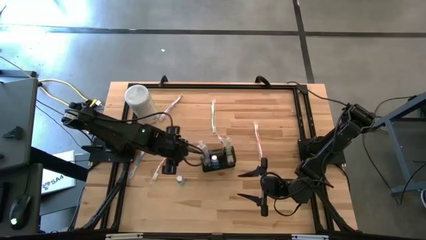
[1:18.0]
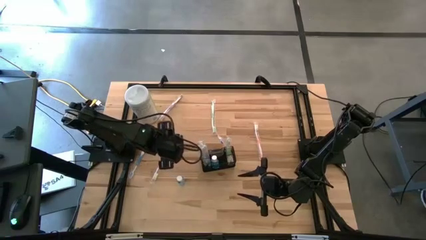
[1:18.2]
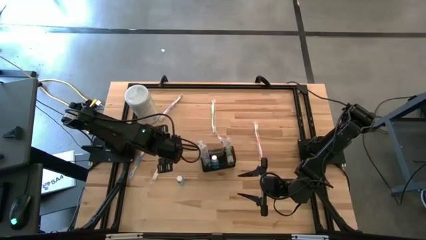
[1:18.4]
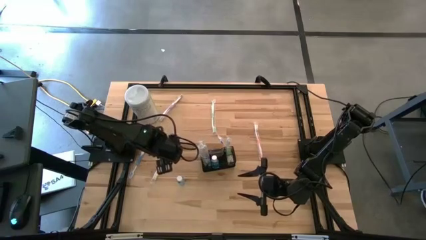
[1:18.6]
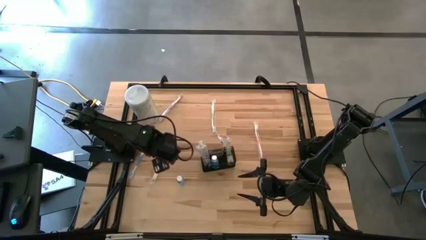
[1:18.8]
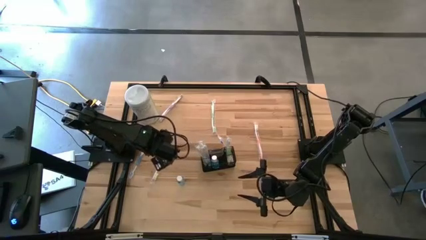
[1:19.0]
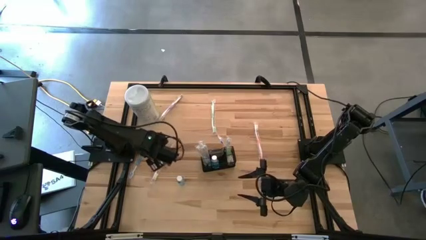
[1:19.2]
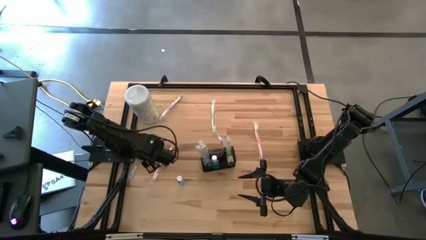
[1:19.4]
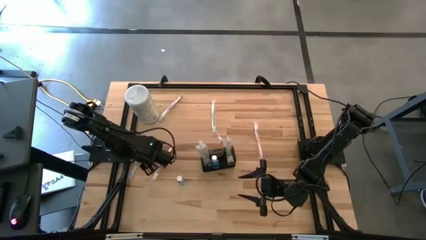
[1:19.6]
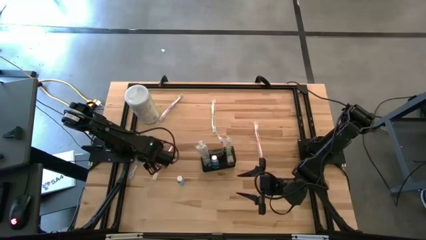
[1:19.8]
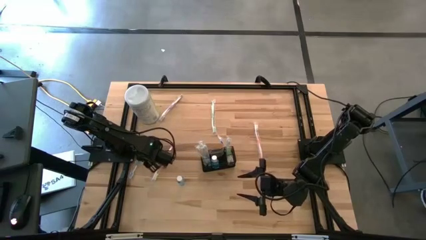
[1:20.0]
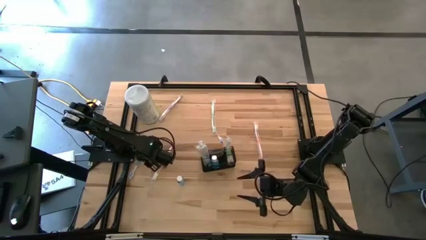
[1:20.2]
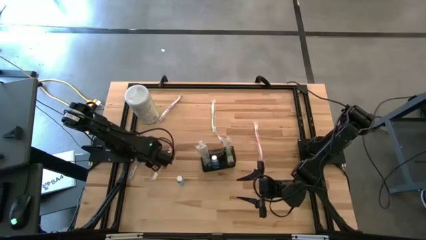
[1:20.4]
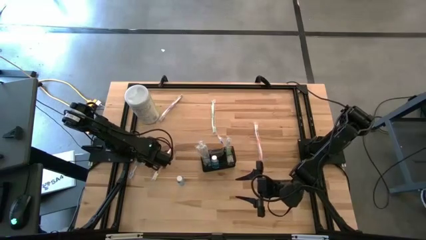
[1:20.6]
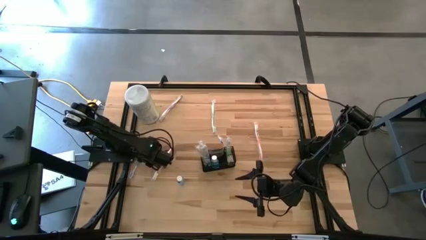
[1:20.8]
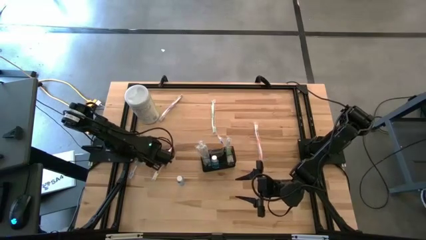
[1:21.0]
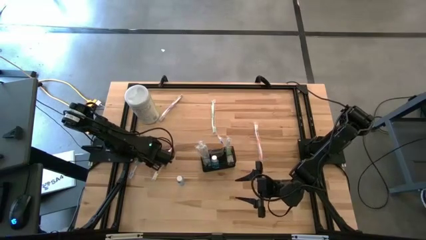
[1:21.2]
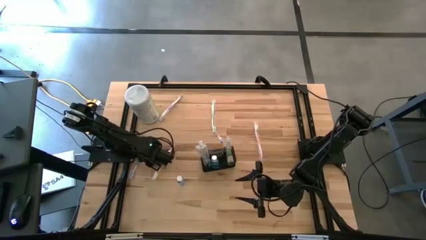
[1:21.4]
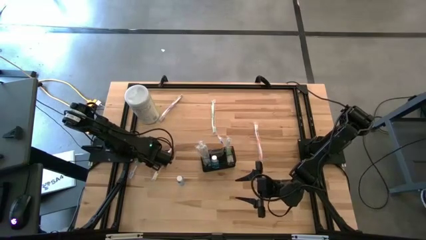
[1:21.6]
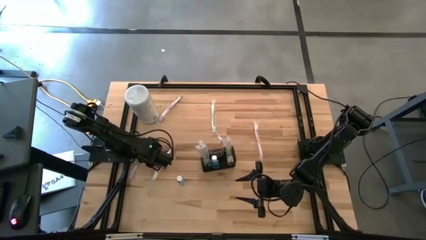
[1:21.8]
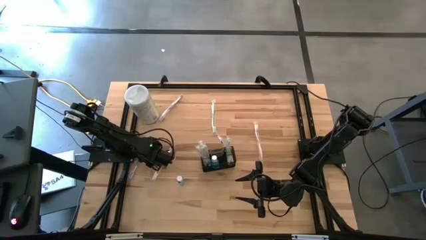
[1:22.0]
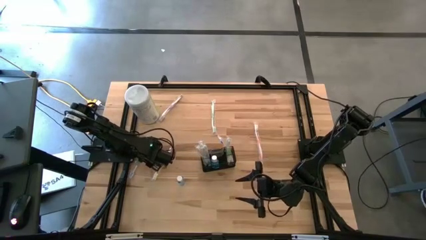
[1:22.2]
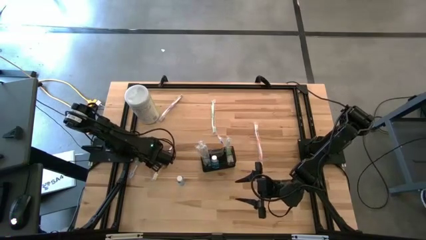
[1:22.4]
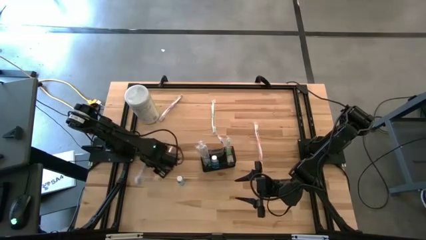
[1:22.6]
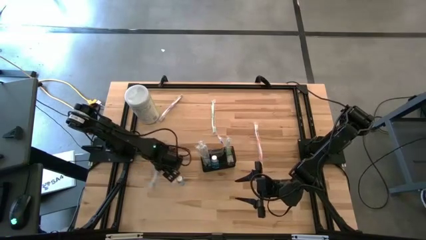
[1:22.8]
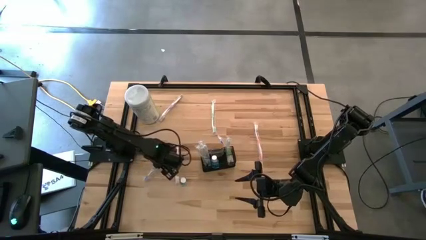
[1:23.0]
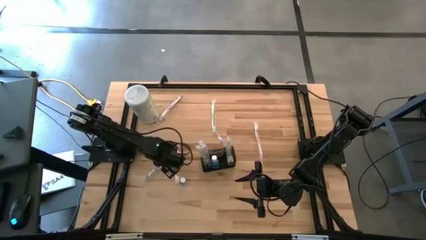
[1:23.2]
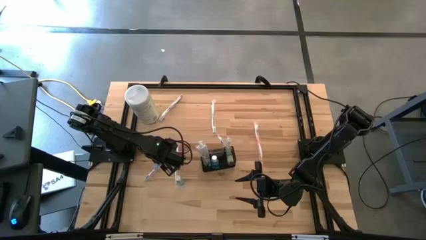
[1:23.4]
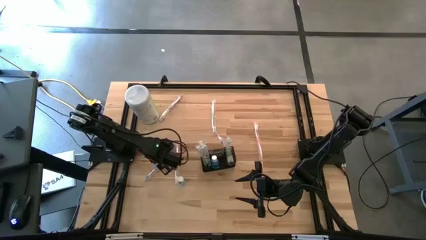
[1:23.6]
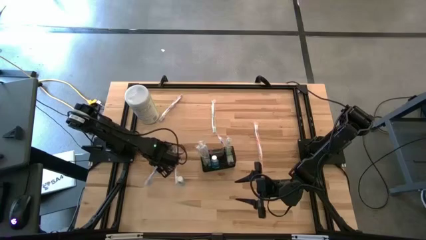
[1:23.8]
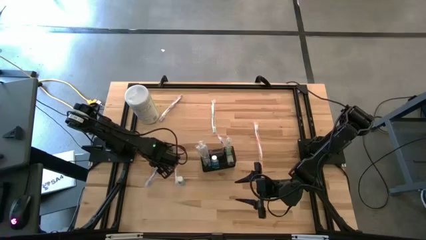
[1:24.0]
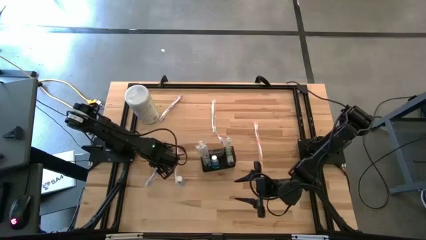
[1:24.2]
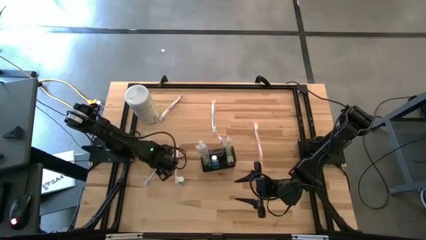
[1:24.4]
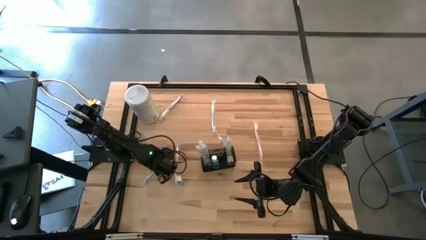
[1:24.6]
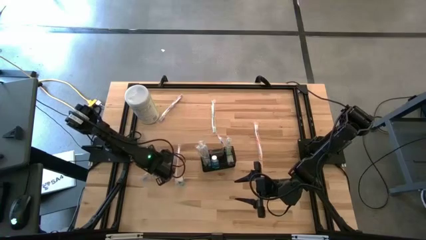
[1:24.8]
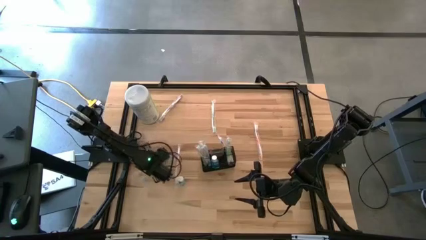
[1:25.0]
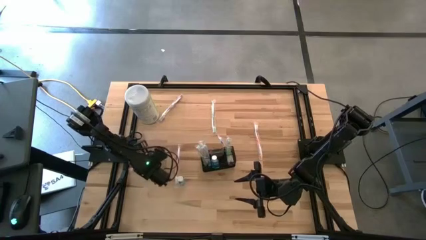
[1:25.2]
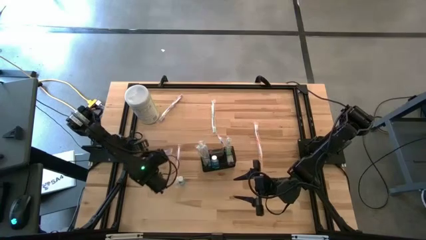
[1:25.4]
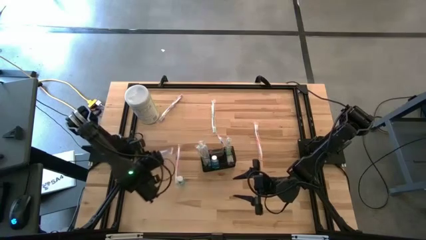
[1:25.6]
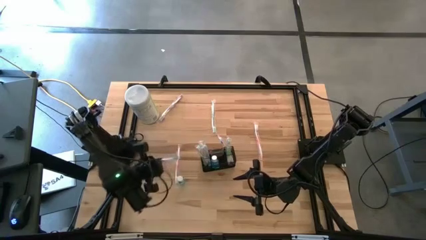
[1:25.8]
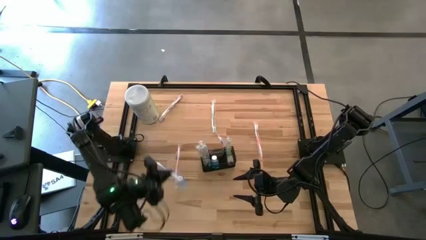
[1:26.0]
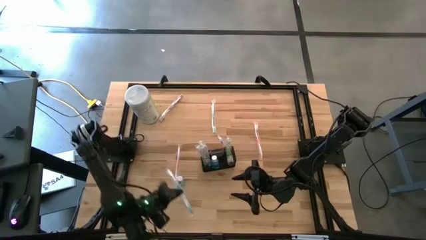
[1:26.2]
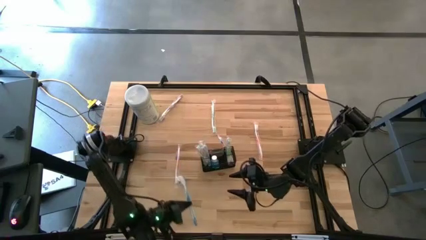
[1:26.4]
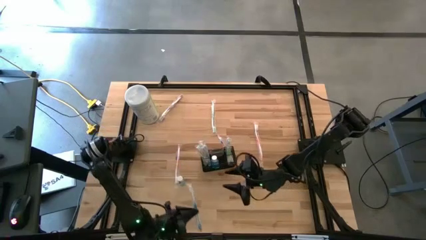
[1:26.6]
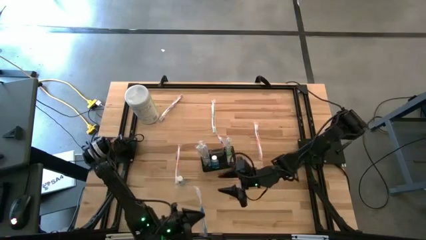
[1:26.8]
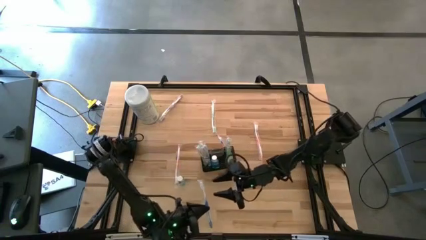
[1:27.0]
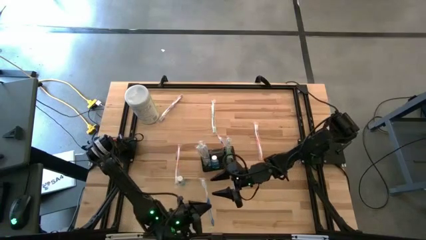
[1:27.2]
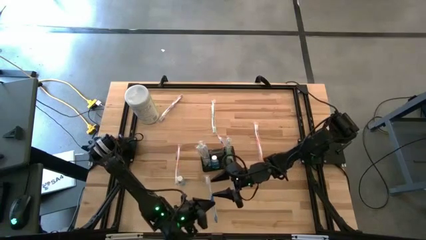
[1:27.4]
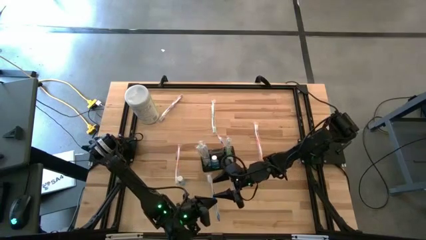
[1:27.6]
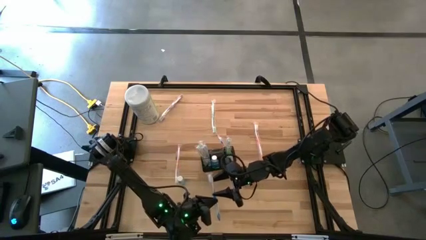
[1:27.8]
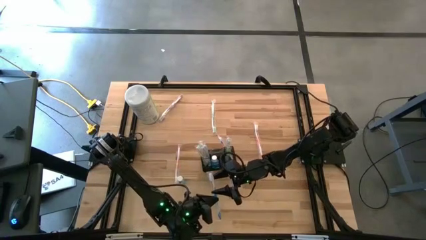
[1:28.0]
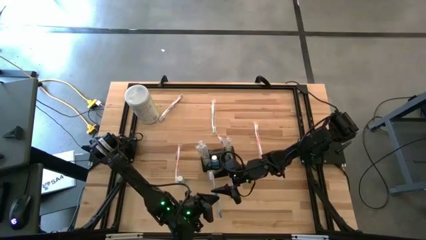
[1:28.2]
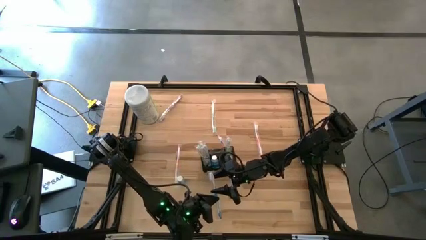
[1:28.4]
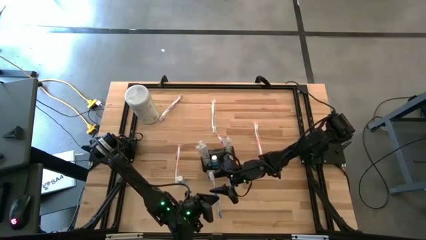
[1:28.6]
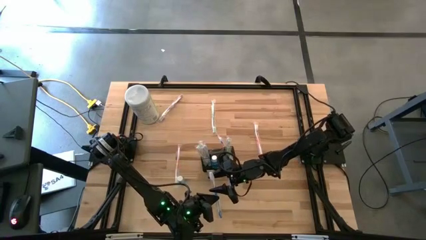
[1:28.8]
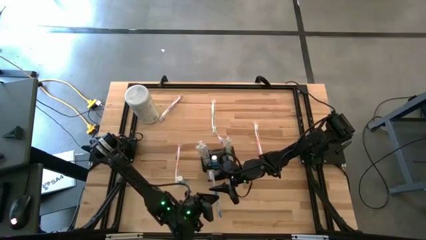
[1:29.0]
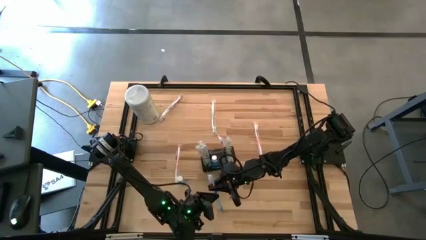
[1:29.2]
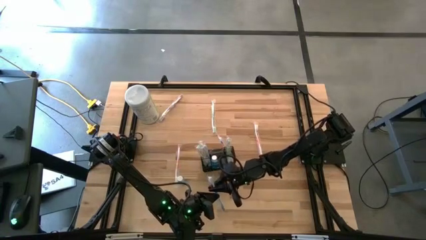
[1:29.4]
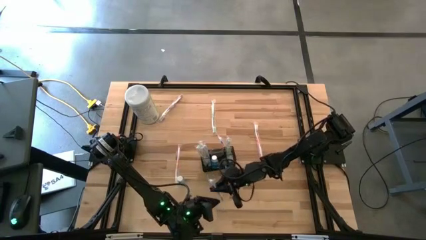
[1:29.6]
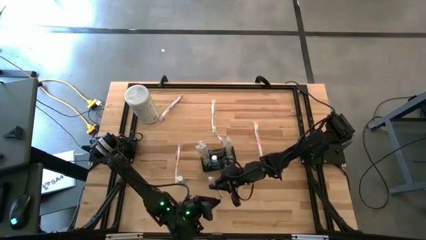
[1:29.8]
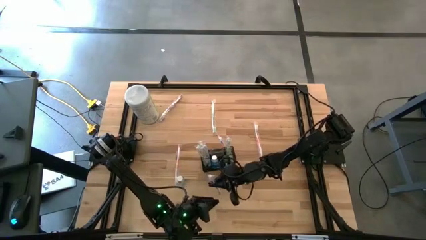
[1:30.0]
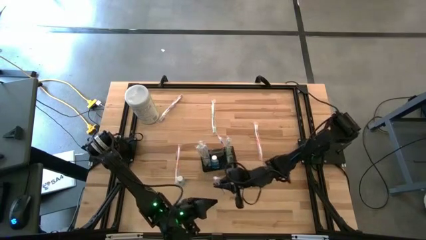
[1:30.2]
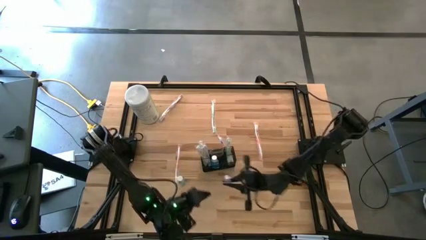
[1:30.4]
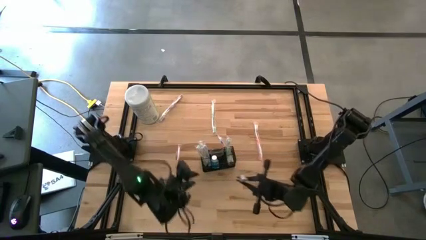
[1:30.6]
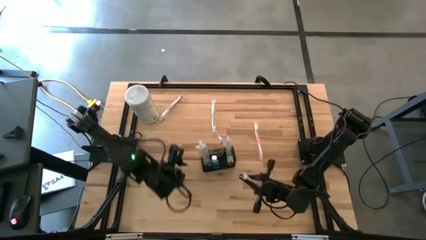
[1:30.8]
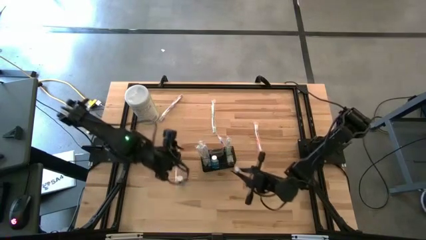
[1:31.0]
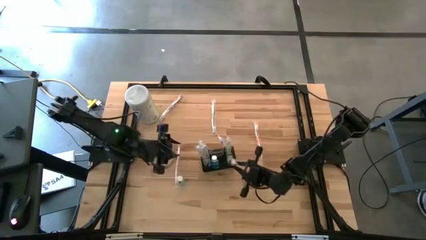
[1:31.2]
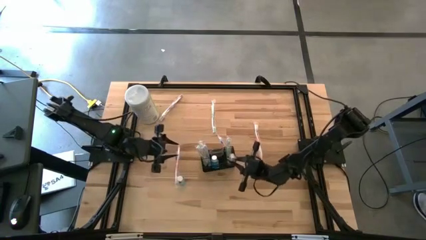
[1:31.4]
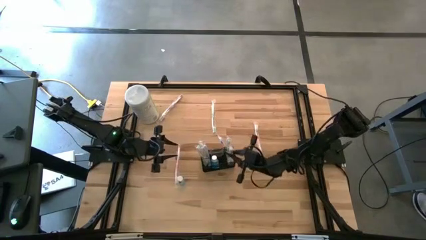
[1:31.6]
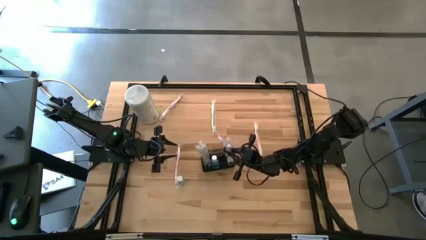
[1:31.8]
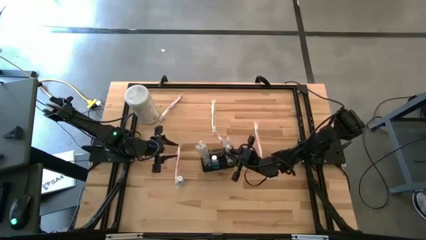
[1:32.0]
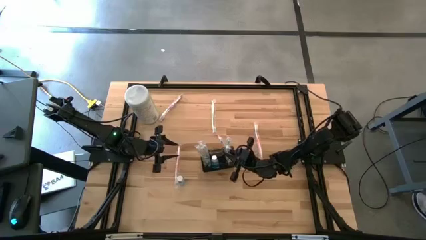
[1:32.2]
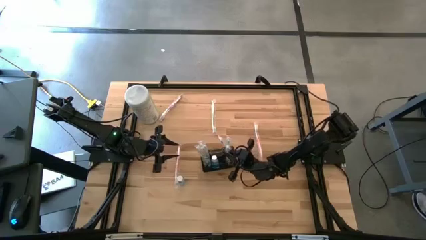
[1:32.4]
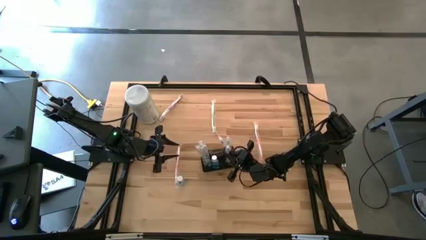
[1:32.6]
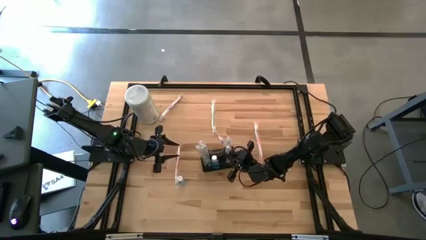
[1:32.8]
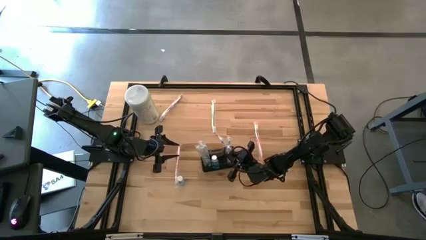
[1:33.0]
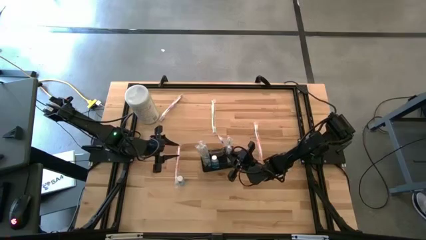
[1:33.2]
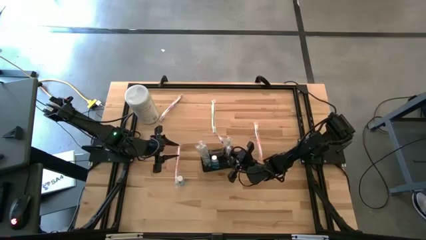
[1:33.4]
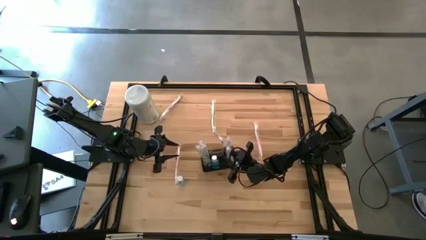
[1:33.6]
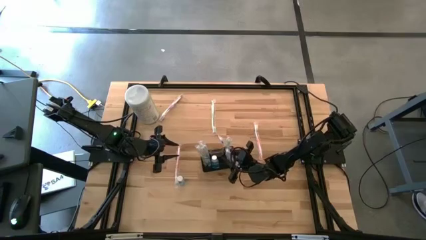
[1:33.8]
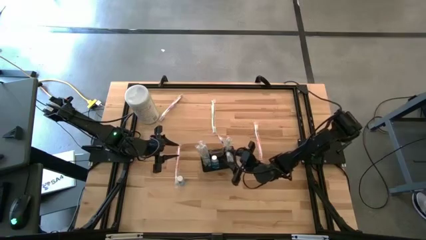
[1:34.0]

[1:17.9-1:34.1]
Task: Pick & Place toothbrushing station
Put the blue toothbrush into the black wire organizer
